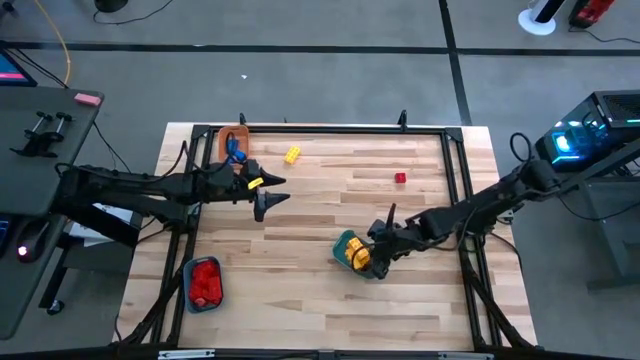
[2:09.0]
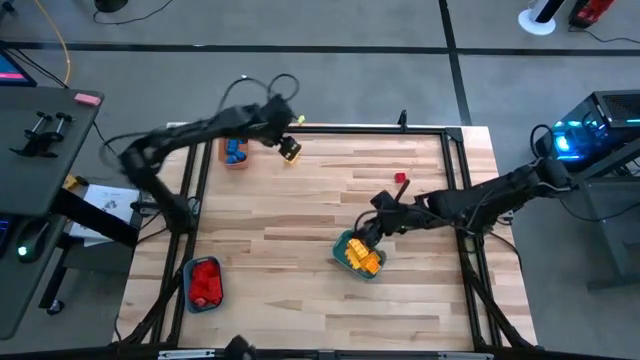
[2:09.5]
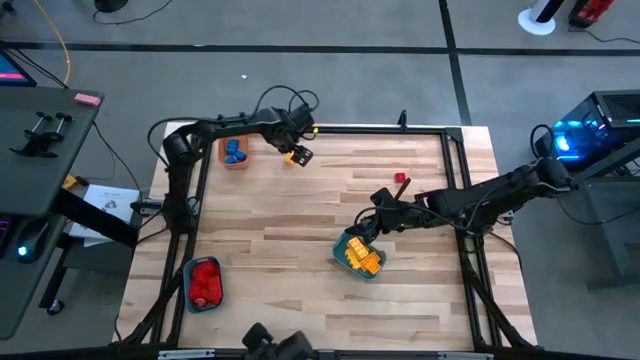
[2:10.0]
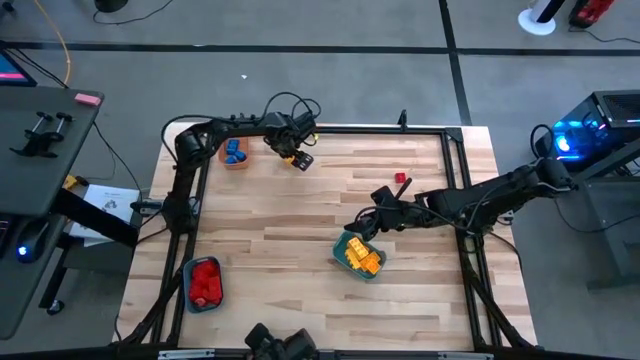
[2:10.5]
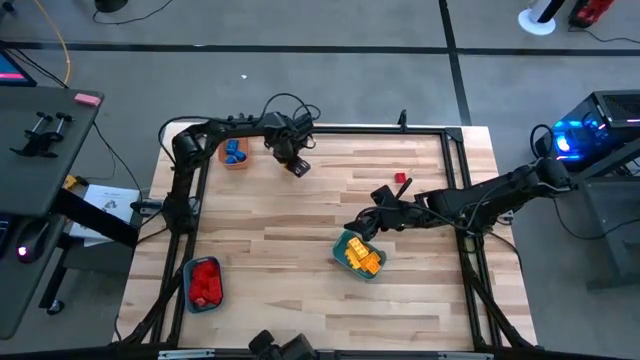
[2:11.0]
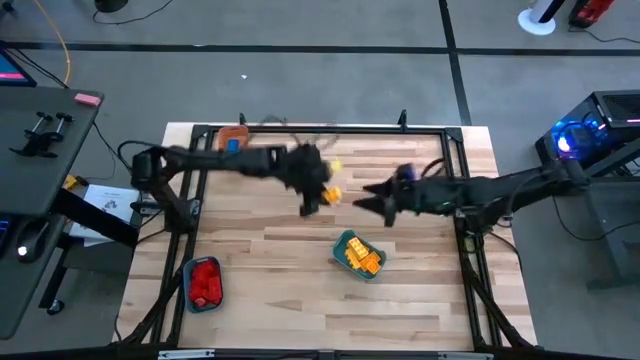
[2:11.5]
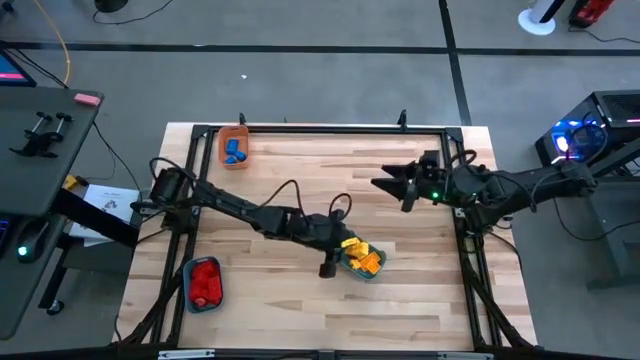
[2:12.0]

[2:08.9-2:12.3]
Task: Sort blocks
Put the yellow game piece into the right blue bin

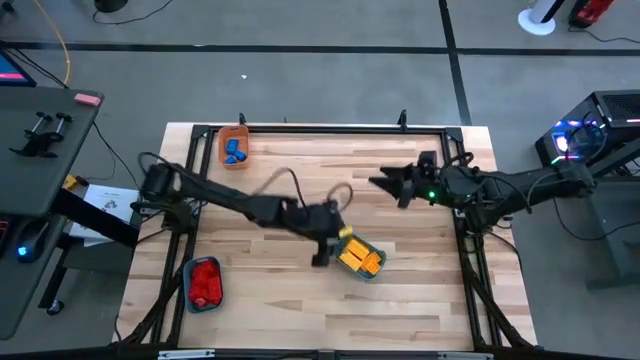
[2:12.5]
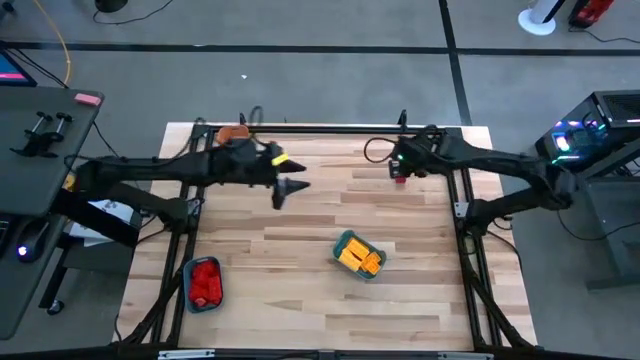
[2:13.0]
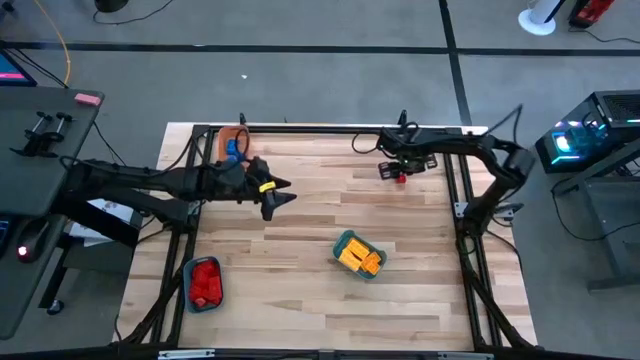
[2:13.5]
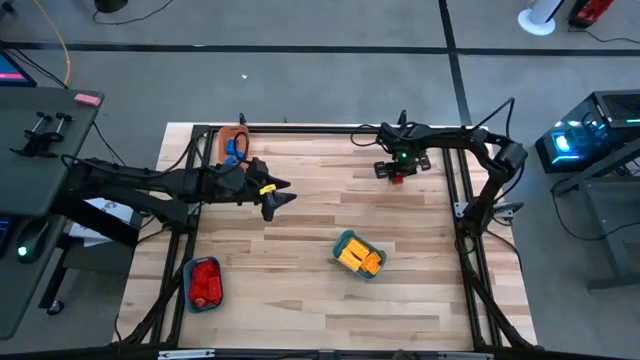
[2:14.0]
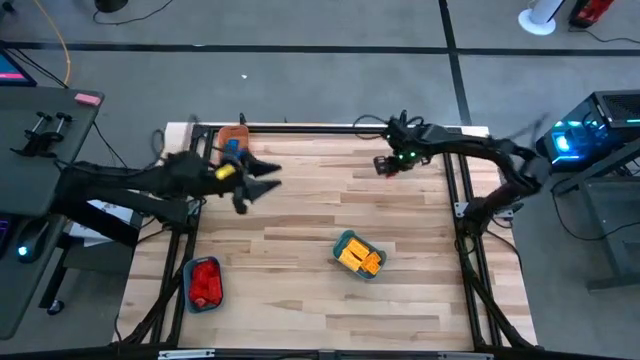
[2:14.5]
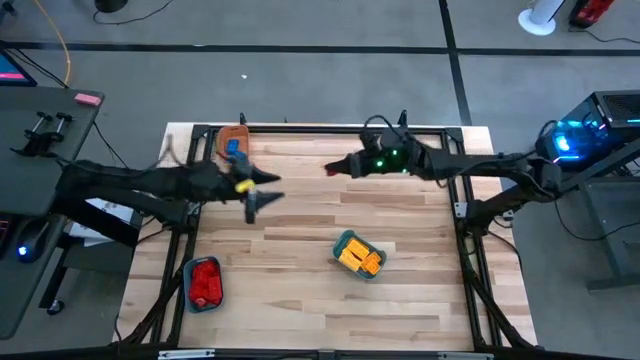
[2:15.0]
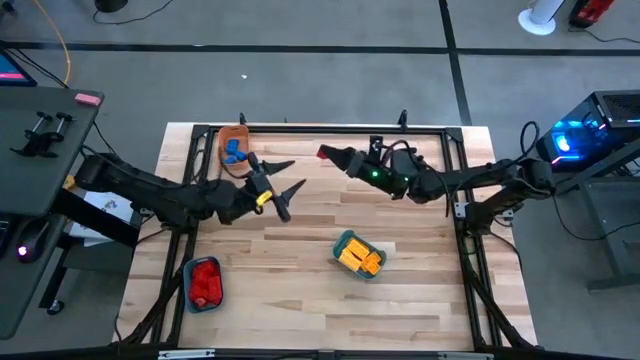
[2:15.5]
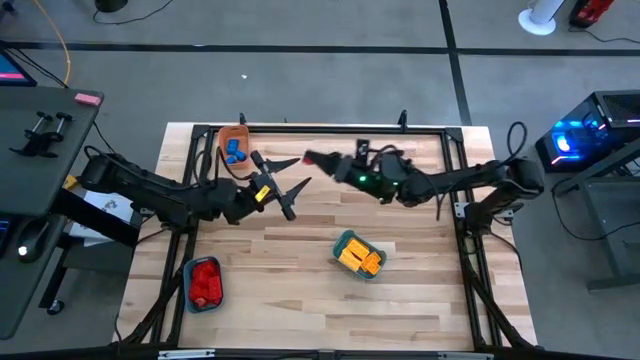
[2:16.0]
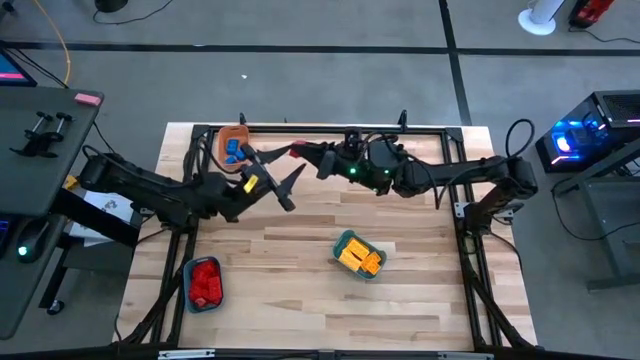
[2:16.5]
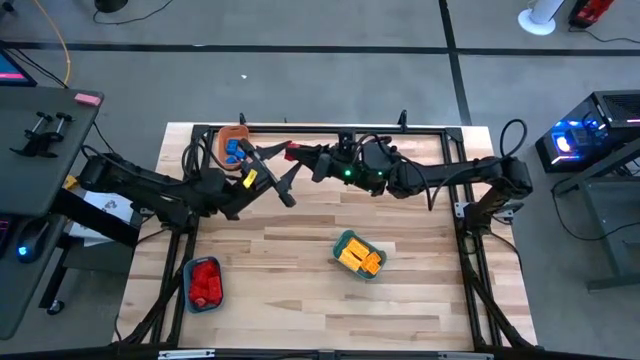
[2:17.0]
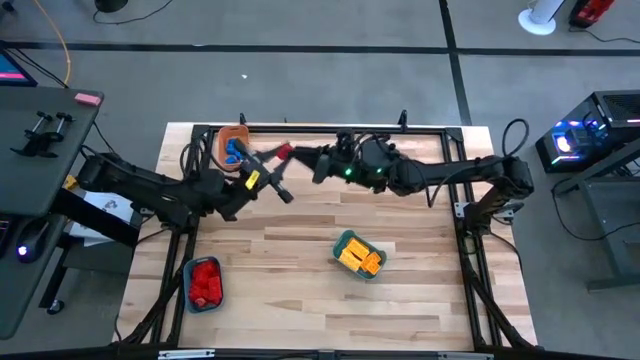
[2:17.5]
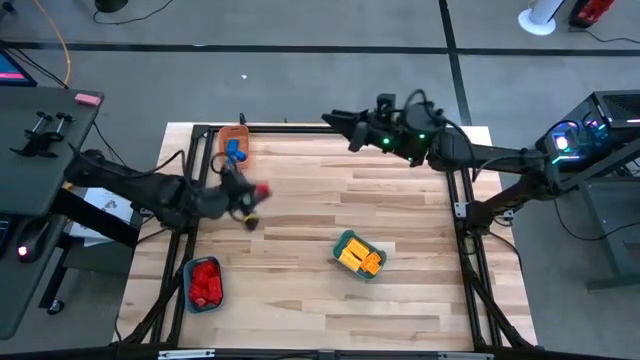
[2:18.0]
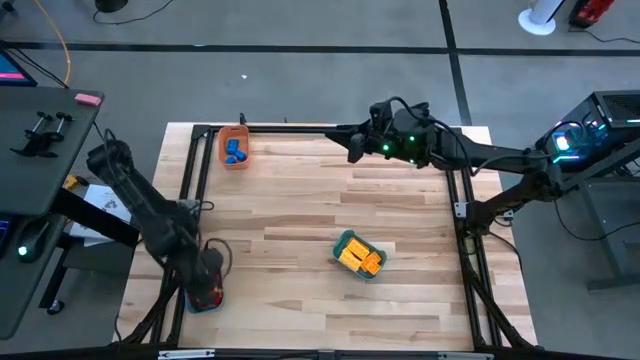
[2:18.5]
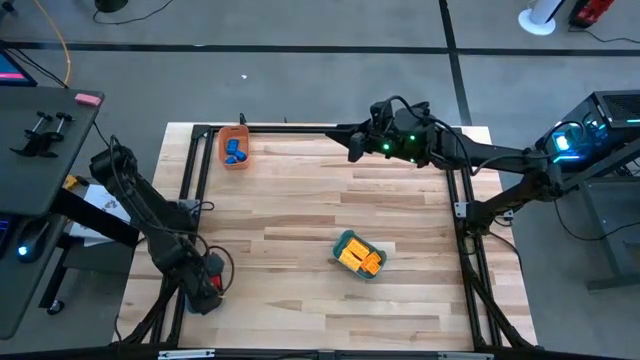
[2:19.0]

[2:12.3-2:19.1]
Put the red game piece into the bottom left blue bin

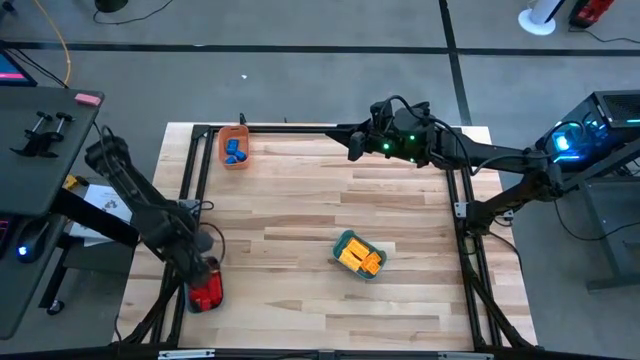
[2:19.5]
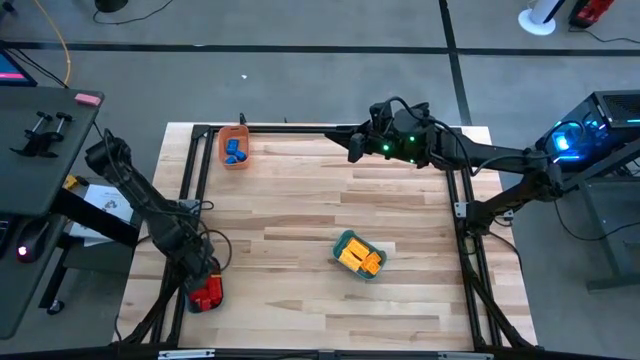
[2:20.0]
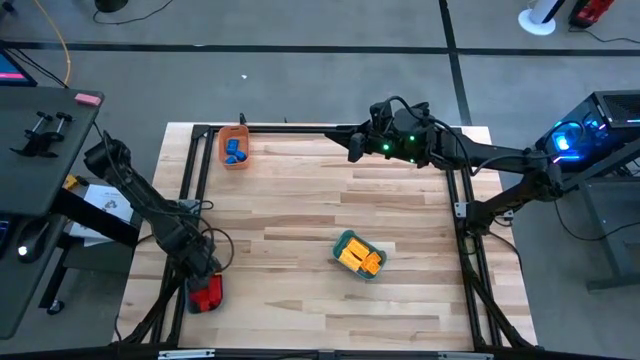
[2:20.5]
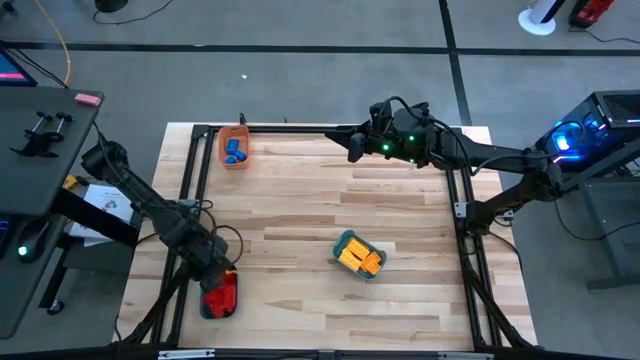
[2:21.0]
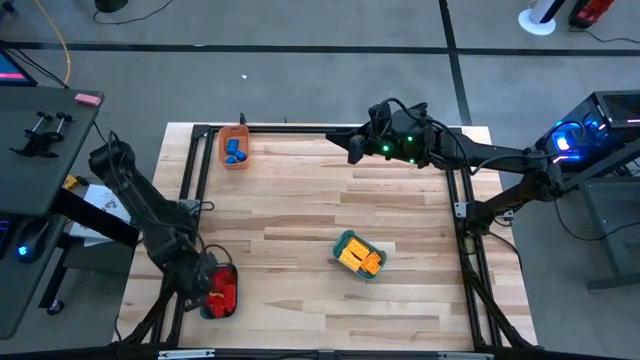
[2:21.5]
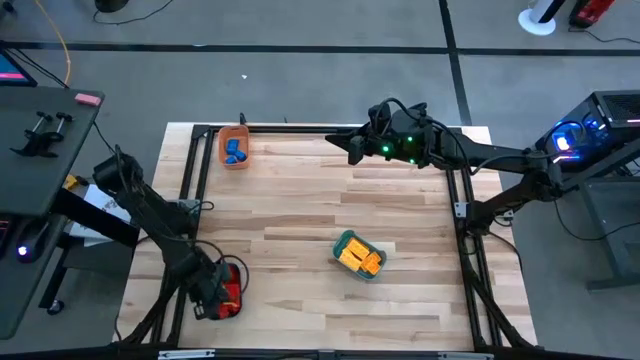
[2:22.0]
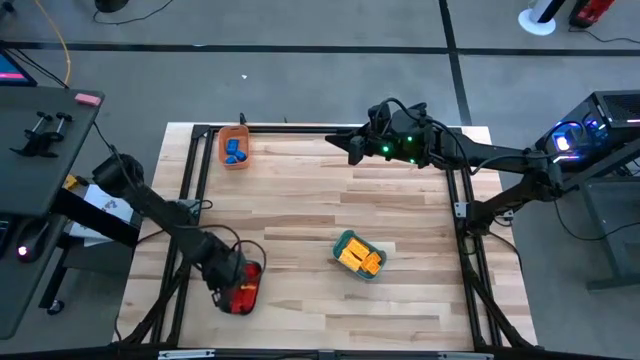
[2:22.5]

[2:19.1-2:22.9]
Adjust the bottom left blue bin

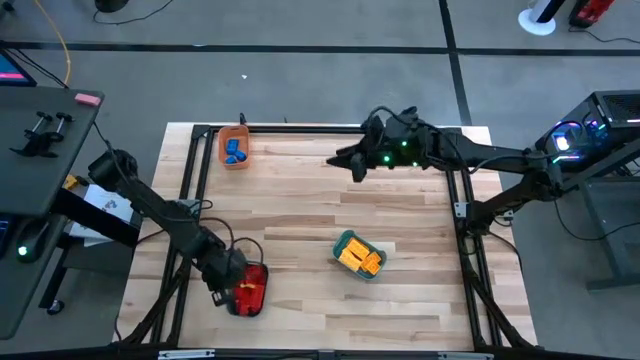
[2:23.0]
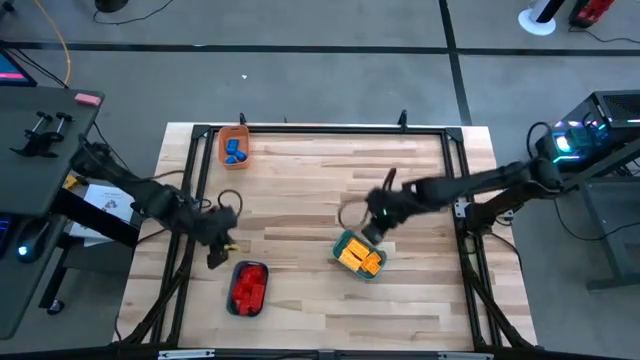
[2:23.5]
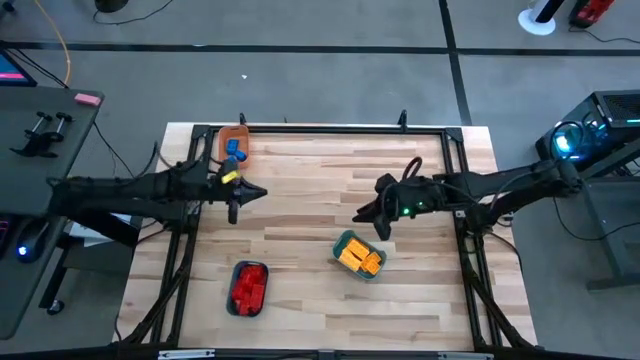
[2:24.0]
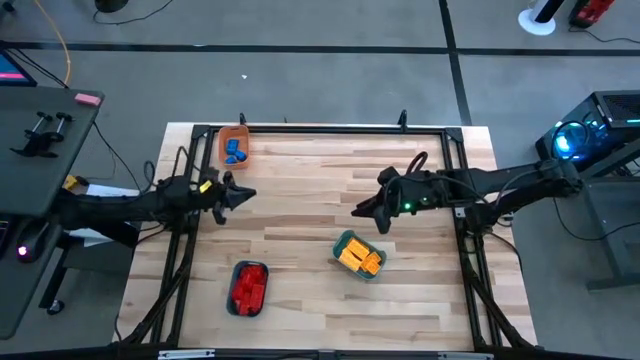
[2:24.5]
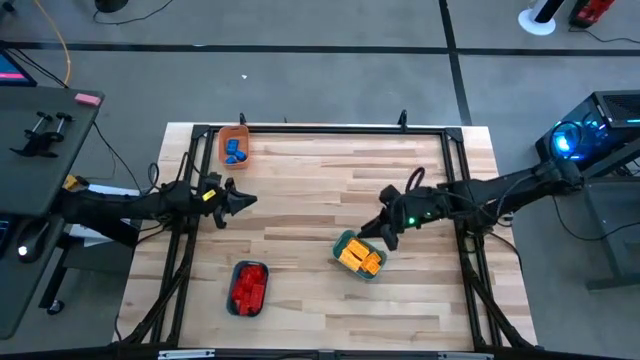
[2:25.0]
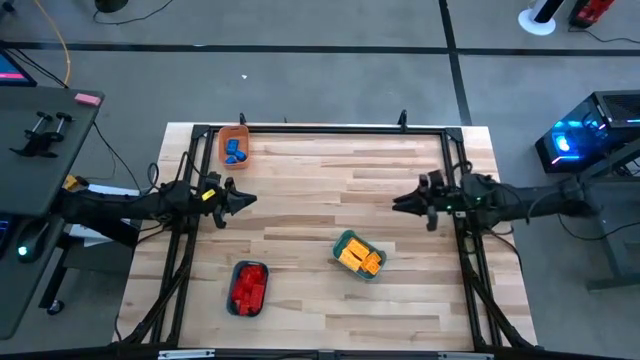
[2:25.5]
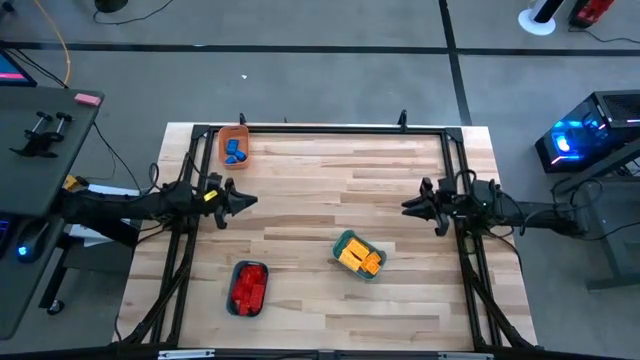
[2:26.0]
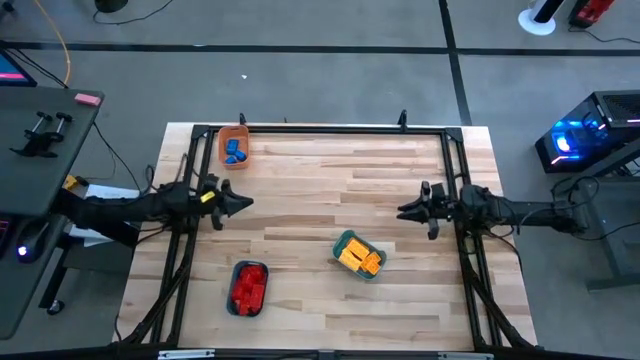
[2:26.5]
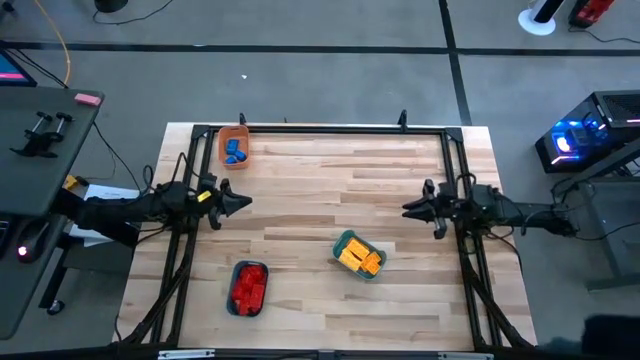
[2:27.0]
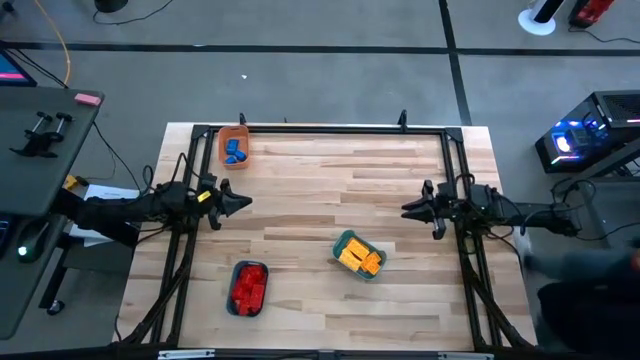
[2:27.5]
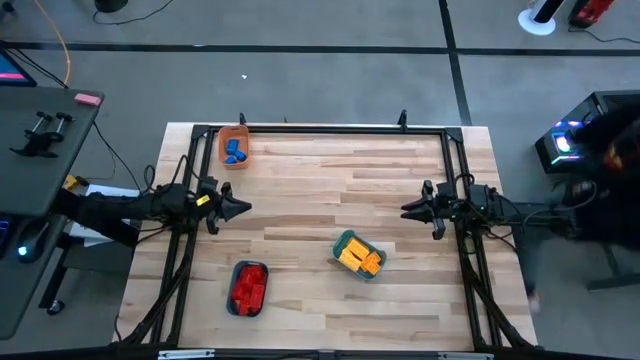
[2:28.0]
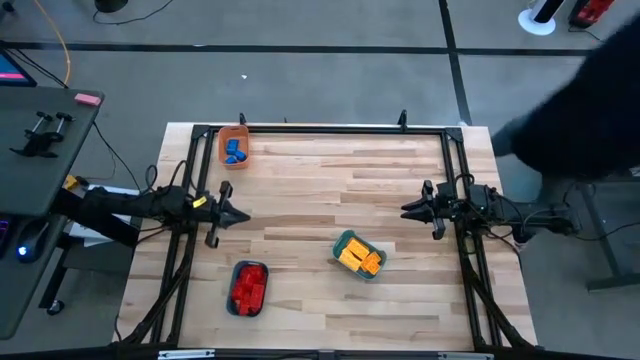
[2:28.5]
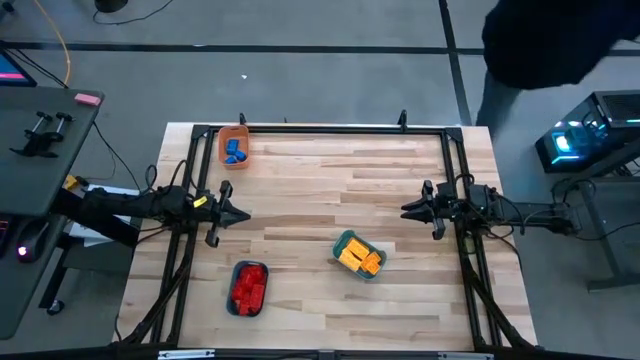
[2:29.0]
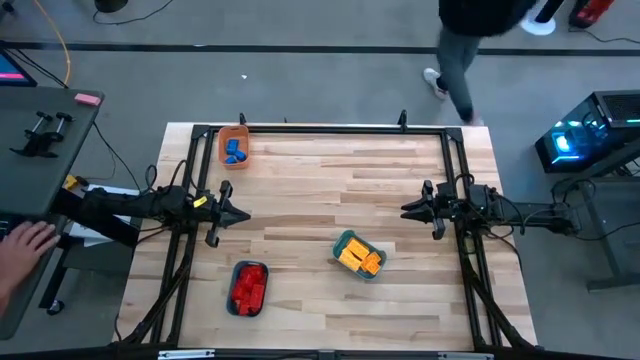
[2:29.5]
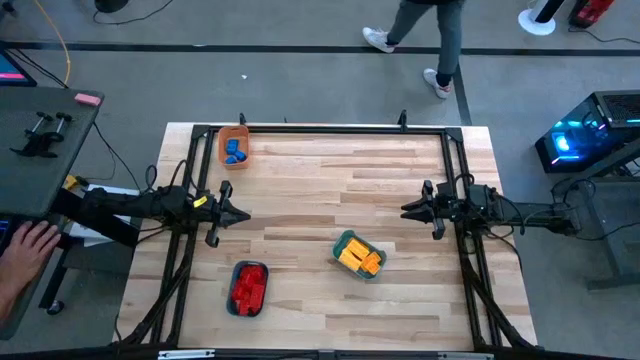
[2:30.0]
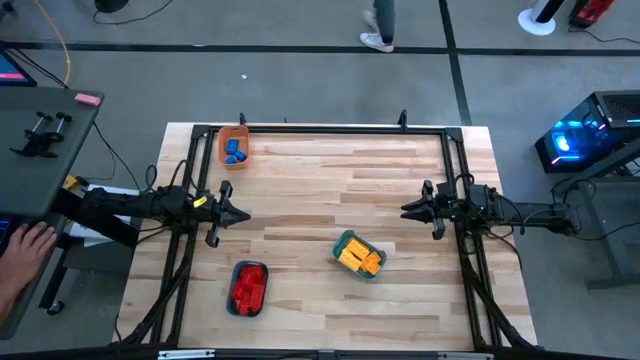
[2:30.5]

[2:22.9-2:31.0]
Return to Home Position
